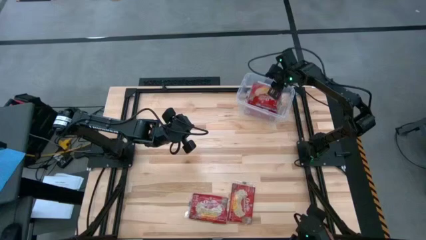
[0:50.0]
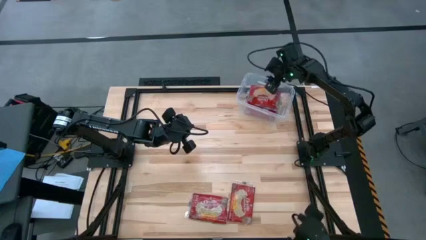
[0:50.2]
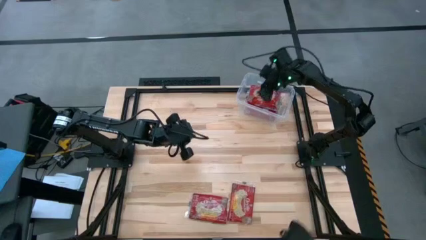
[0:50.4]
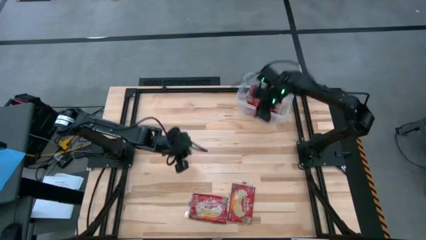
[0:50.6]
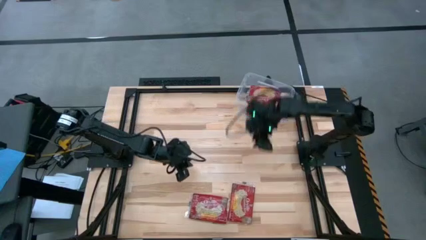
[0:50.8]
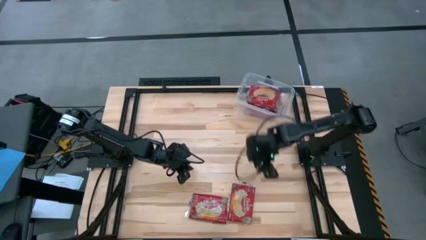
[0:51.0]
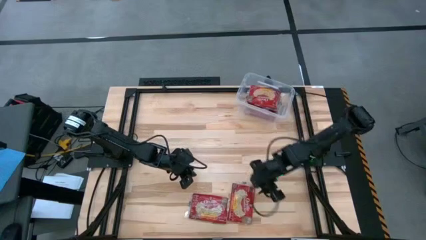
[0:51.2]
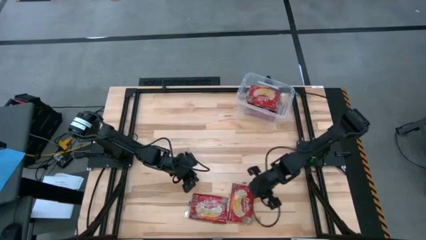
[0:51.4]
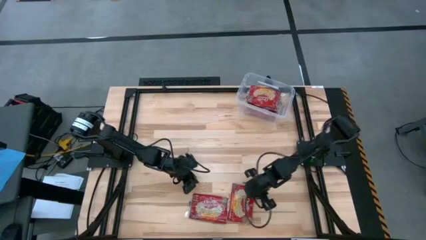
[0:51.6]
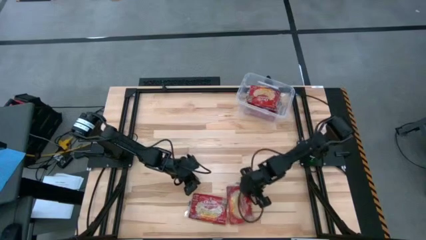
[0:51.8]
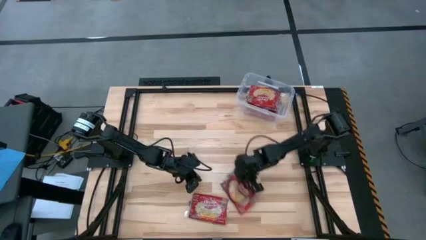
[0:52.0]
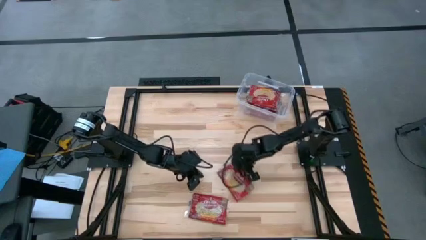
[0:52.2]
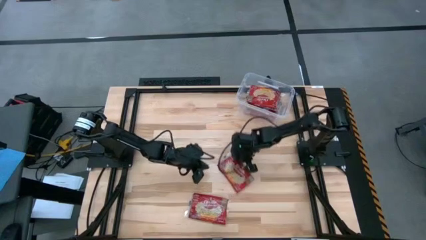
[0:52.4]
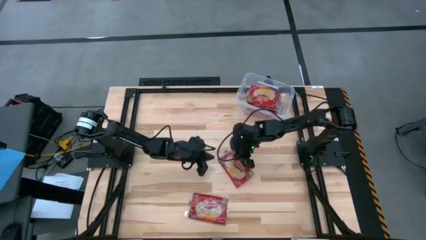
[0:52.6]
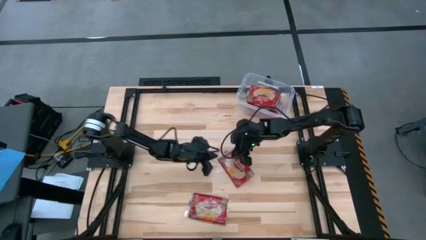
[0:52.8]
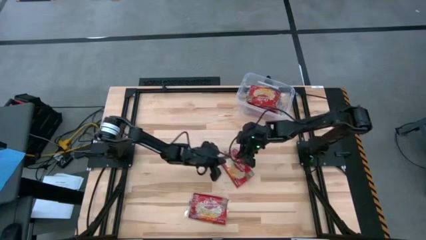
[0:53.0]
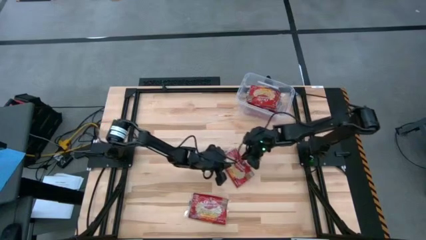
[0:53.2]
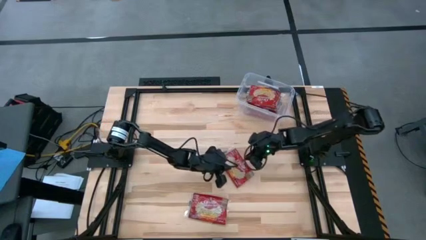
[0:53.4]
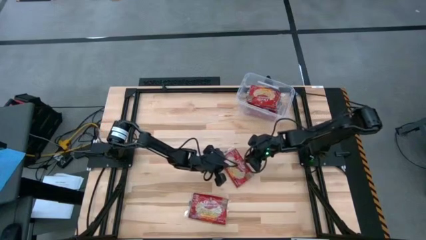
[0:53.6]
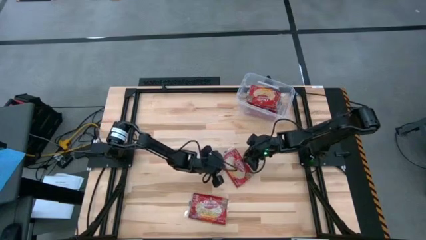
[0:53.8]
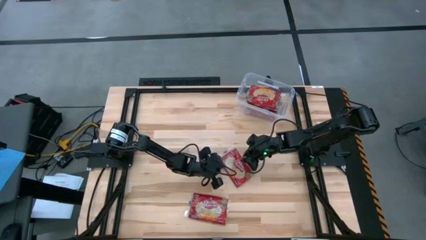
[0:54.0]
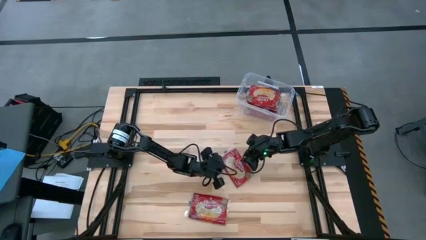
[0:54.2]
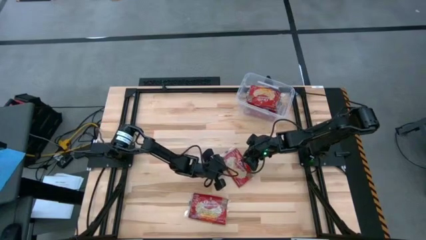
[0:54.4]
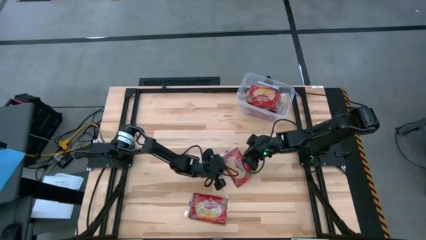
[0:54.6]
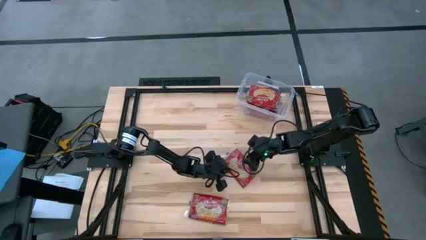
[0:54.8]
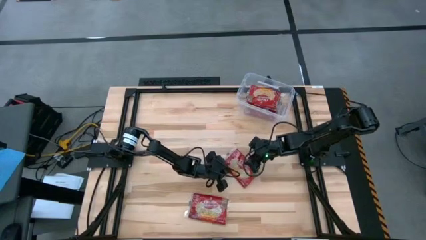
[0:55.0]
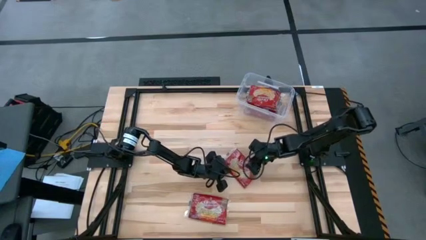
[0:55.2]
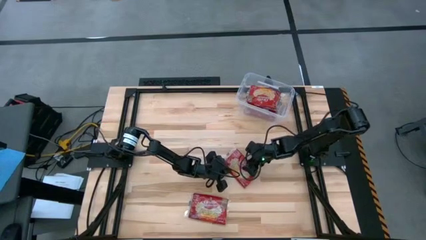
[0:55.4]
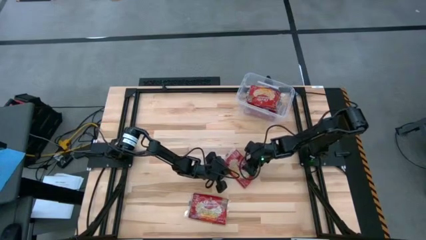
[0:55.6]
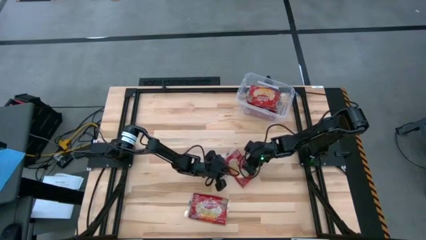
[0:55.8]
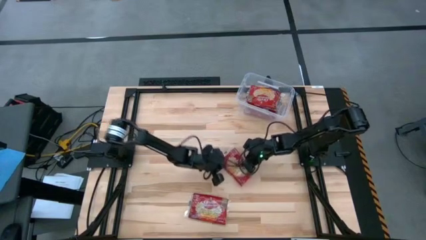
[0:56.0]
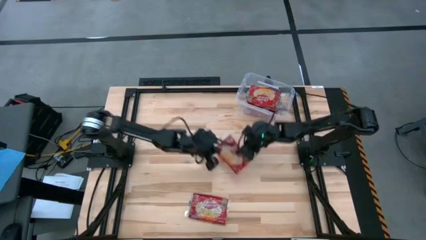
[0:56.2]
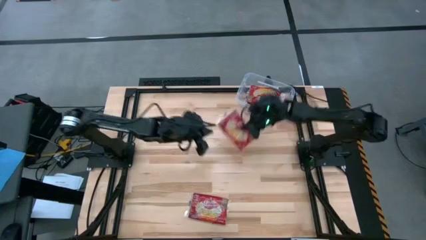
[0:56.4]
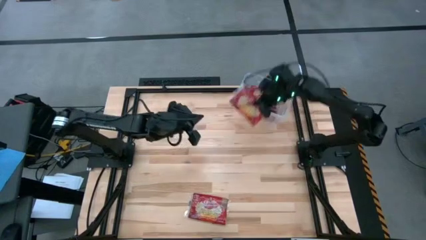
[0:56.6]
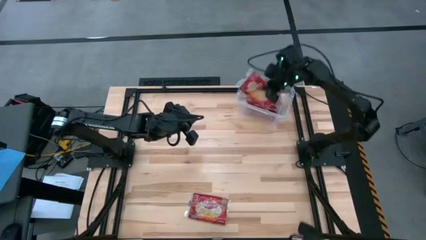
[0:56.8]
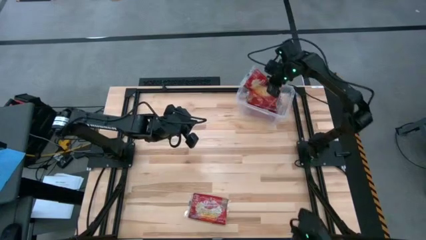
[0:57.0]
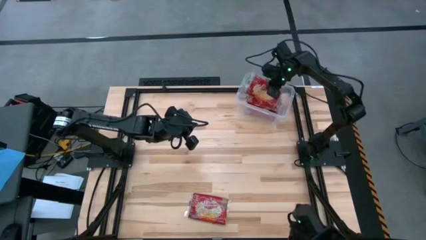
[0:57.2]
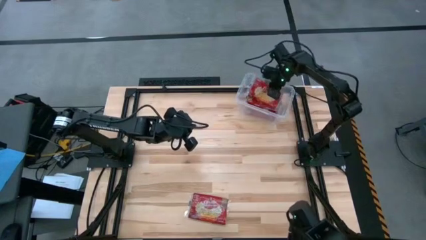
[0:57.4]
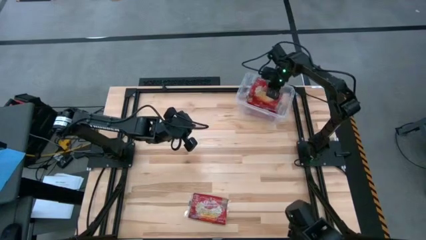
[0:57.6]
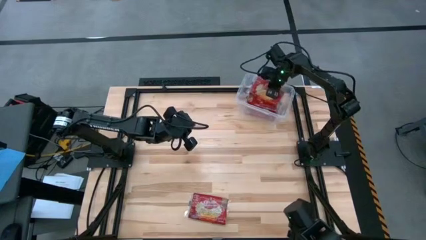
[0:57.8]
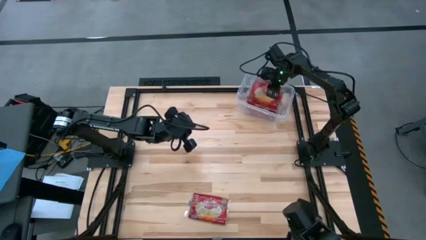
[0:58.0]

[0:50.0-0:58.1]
Task: Sort popcorn bags into baskets
Put the red popcorn bag into the transparent bin

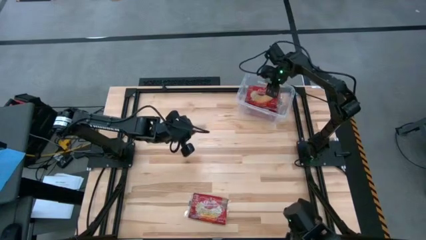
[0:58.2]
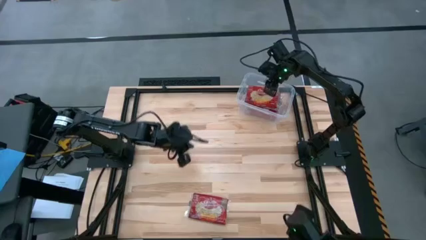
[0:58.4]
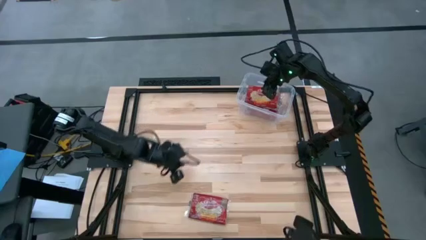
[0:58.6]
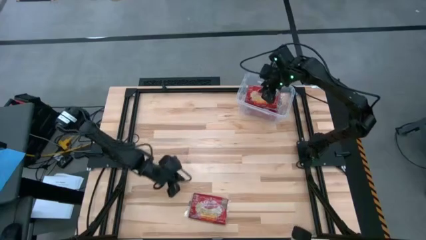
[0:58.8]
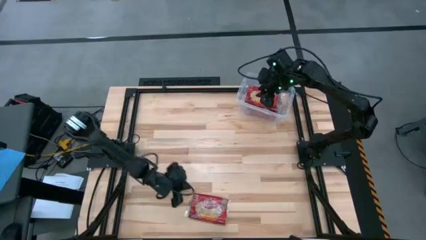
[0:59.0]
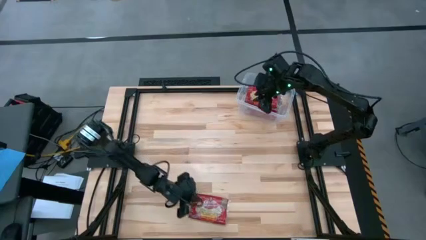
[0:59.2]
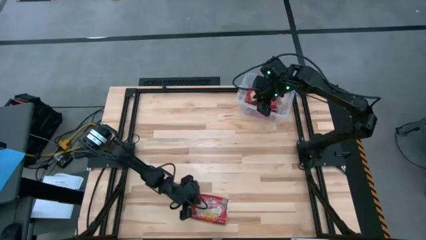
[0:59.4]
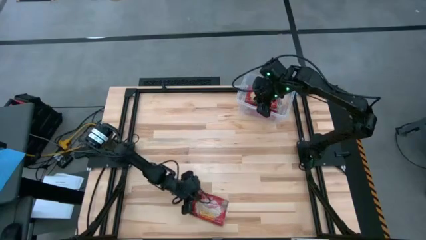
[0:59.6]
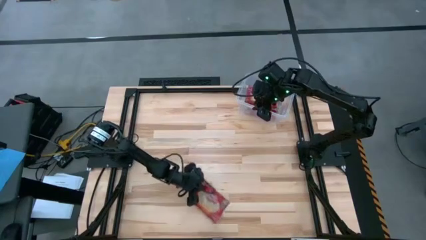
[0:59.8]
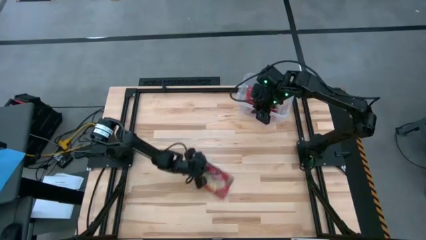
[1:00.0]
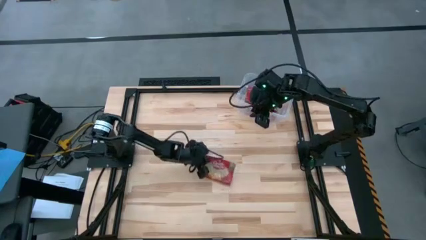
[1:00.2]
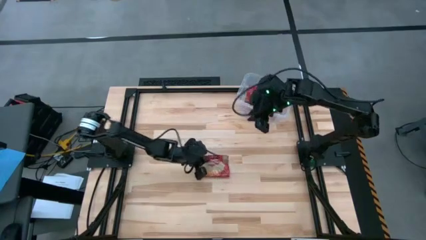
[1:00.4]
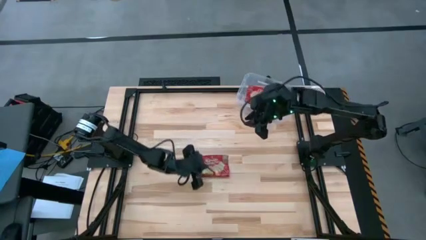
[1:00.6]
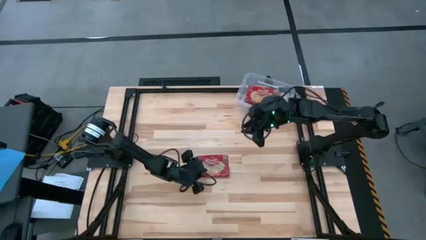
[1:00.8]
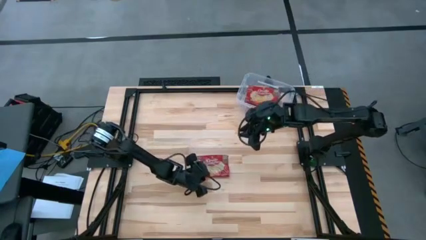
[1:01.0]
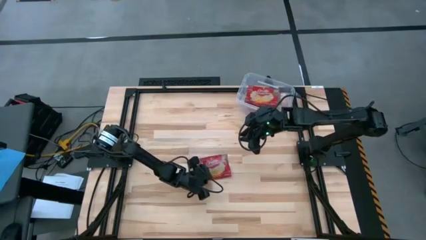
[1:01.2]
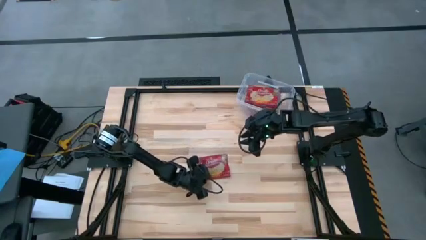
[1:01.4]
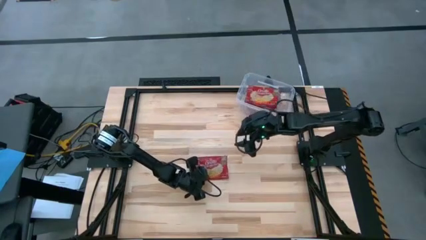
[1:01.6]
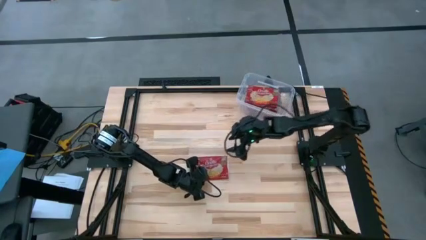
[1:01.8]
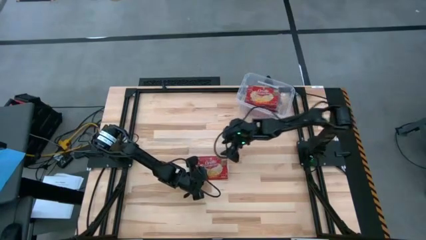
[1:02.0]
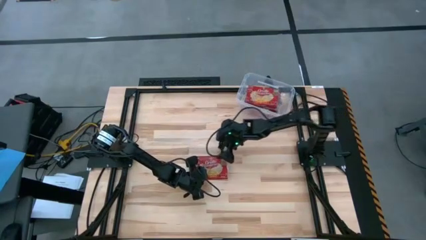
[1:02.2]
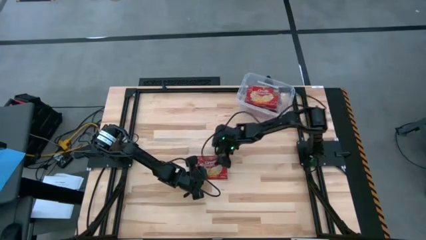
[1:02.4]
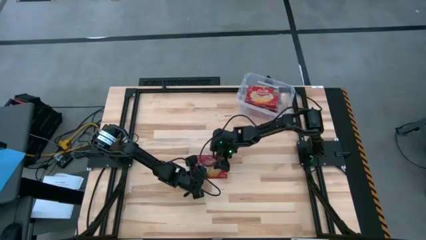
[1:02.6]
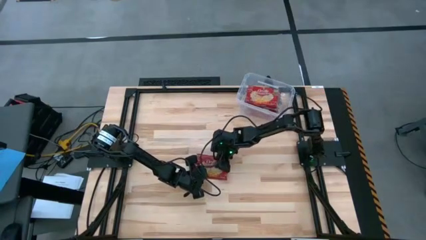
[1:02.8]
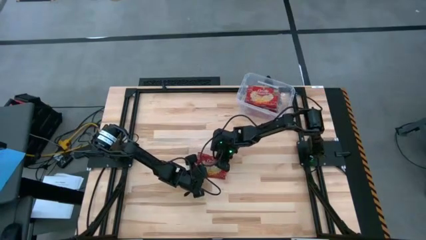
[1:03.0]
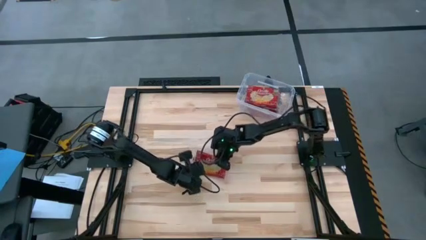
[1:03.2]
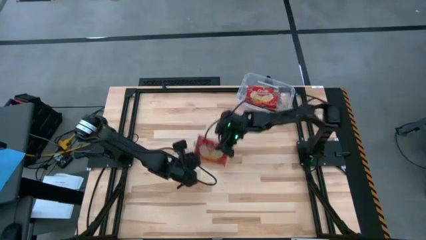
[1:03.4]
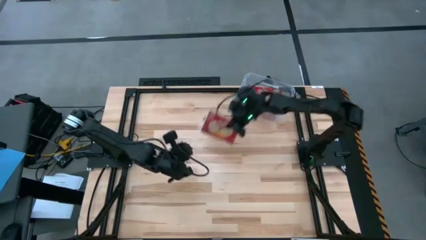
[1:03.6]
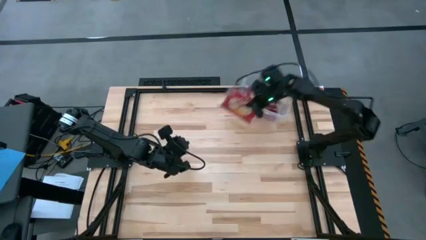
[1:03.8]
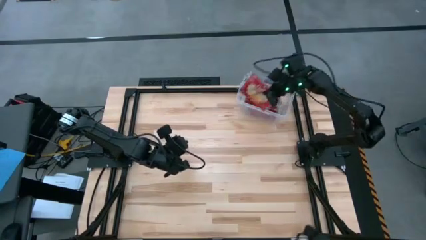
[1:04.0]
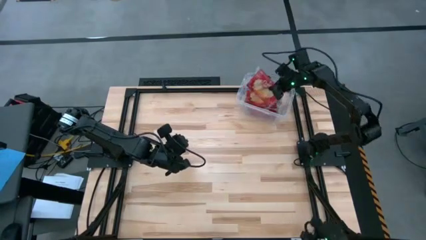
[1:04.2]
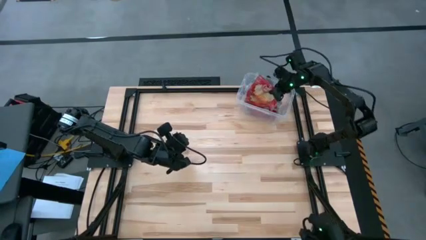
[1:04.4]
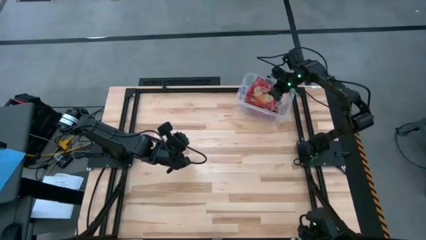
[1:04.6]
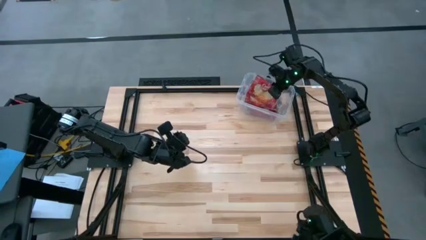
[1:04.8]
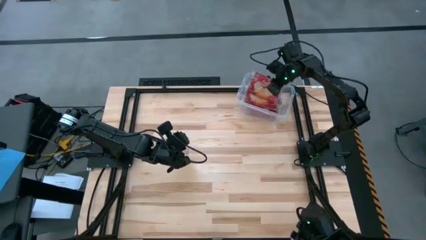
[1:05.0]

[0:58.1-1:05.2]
Put the red popcorn bag into the transparent bin

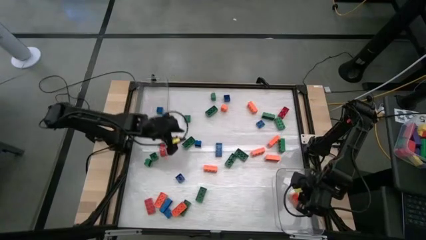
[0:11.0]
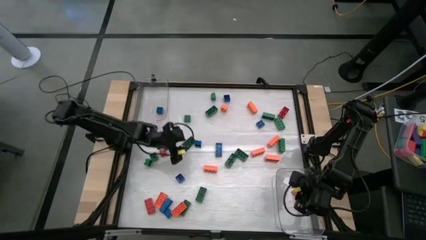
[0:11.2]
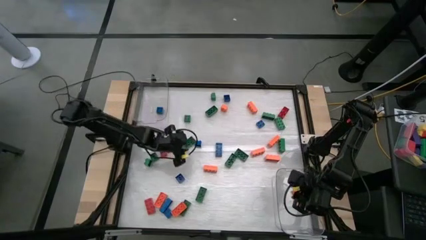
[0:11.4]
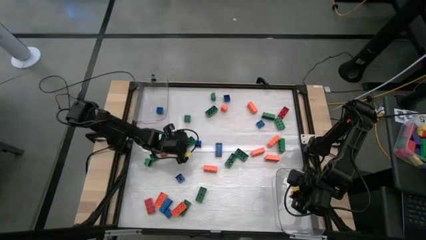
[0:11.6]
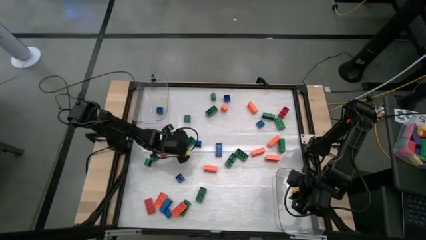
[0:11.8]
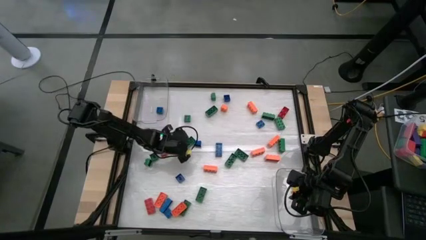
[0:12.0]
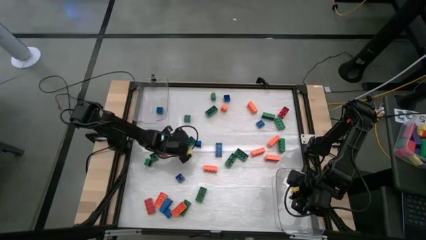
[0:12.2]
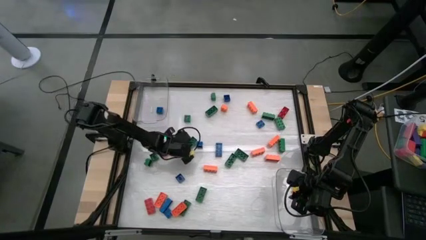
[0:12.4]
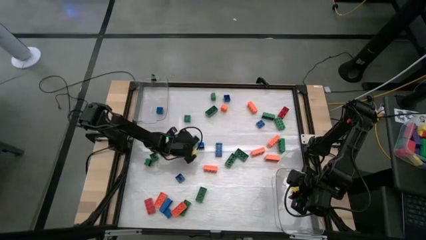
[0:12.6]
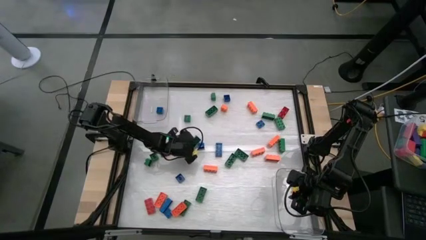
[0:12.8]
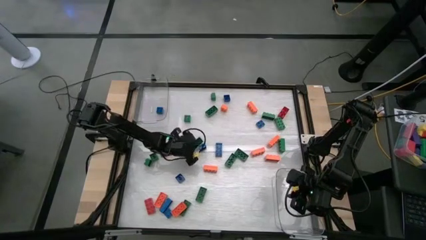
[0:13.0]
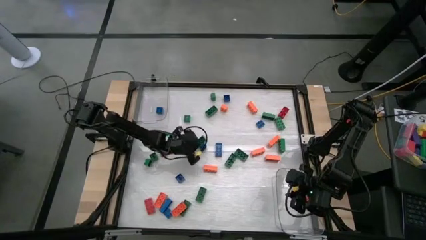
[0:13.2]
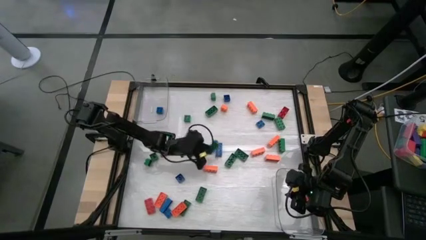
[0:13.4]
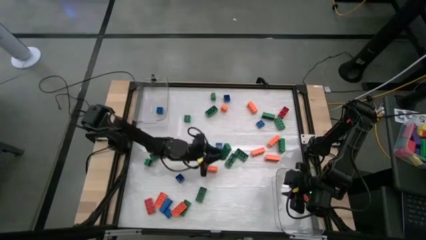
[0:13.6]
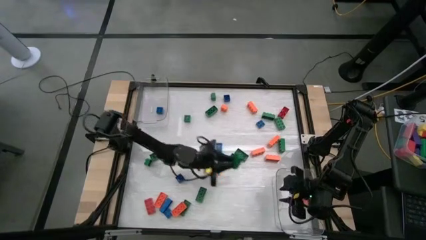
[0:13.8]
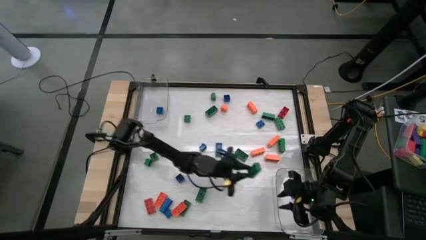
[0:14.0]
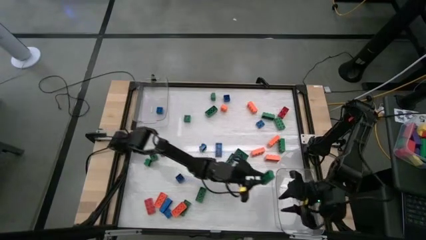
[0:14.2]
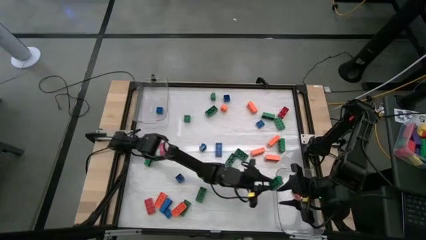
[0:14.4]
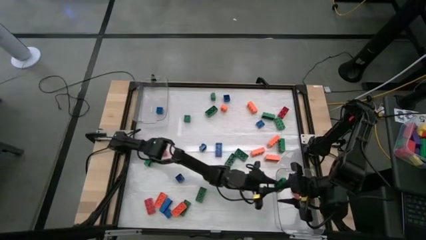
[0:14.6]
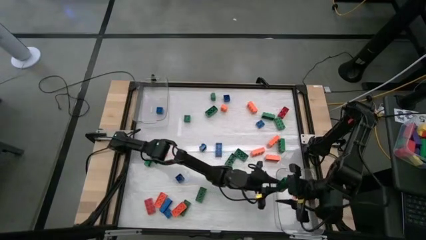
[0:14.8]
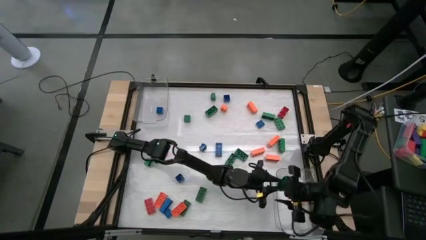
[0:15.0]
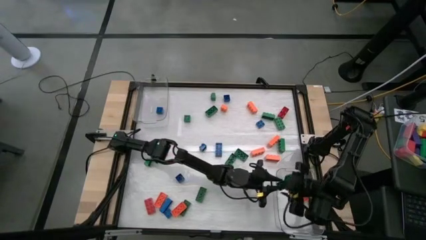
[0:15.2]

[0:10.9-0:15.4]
Task: Sort blocks by size
Put the 8 stud green game piece into the bottom transparent bin
